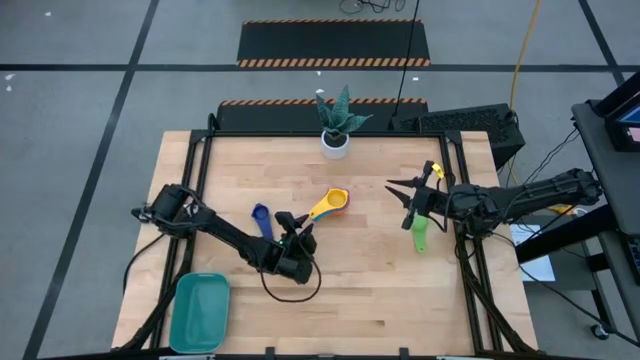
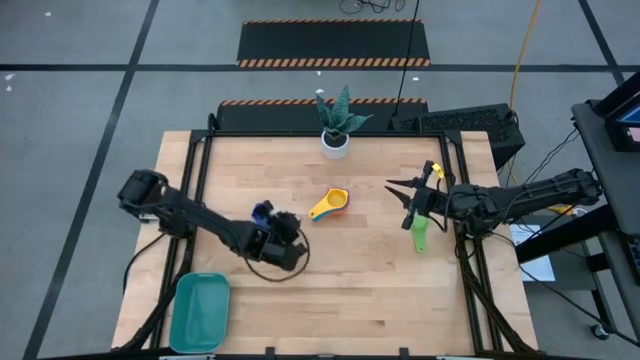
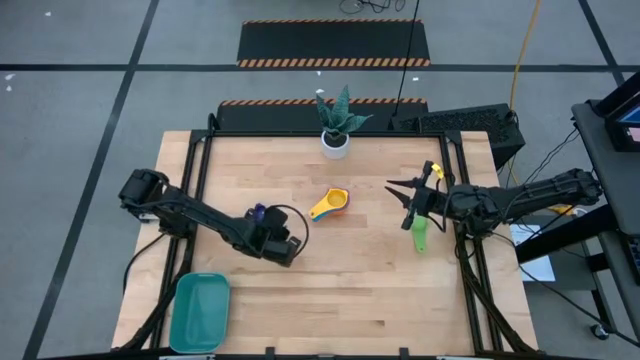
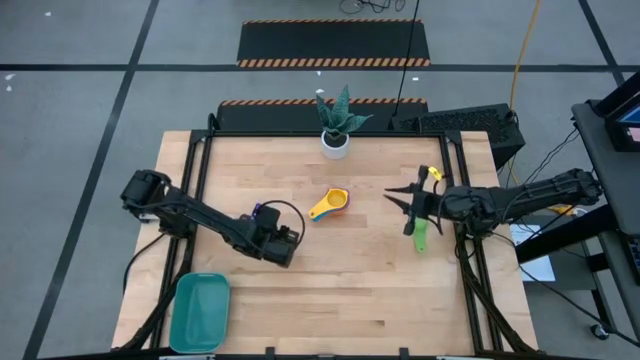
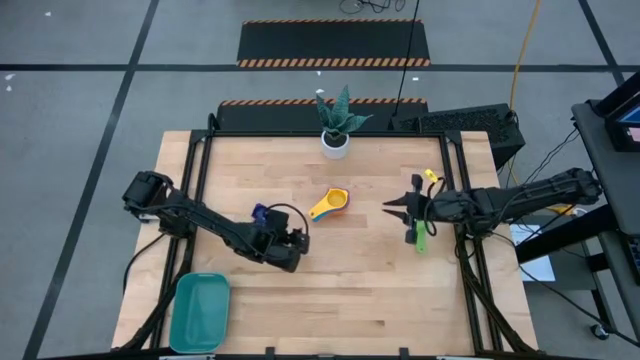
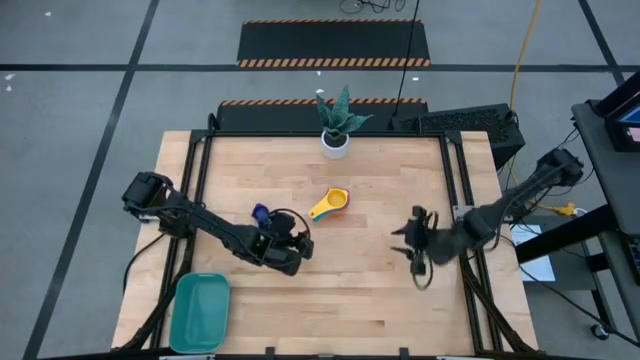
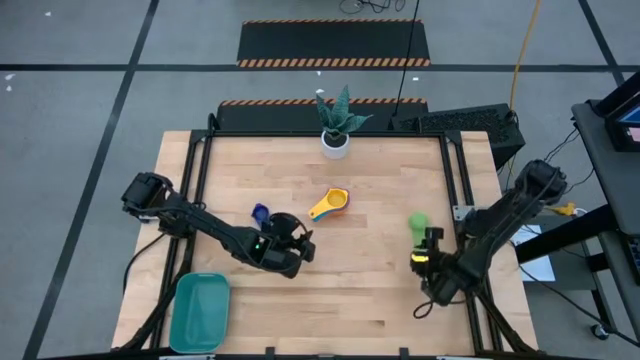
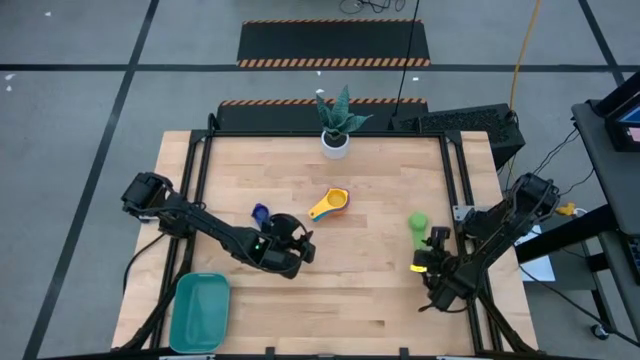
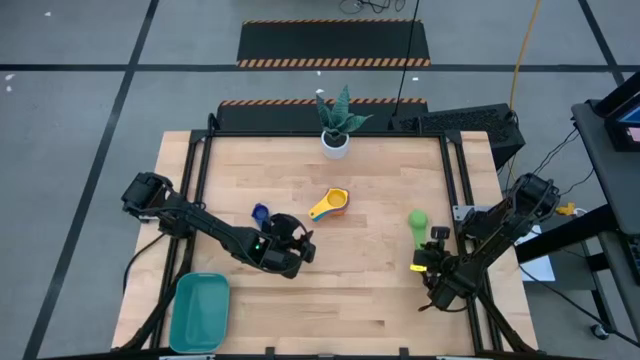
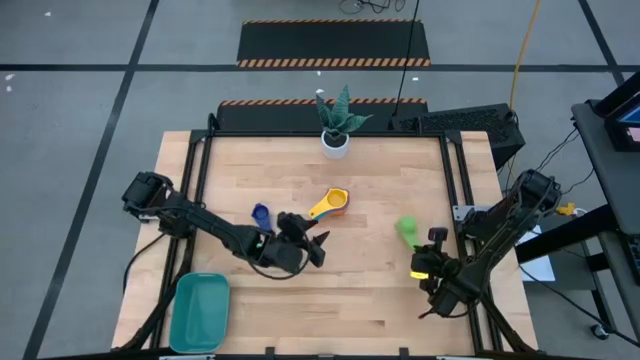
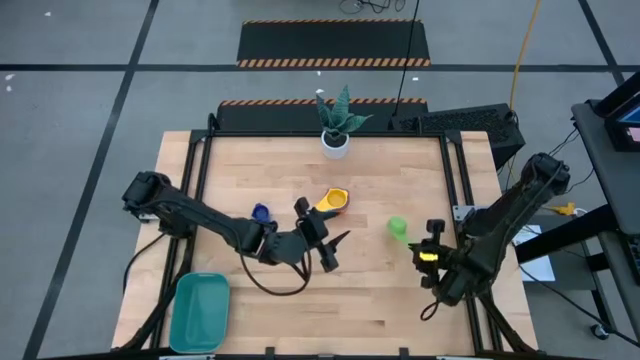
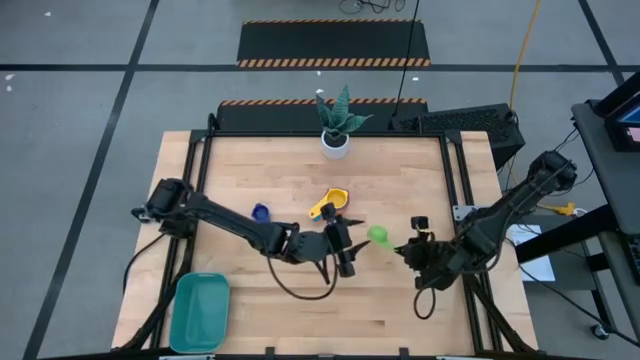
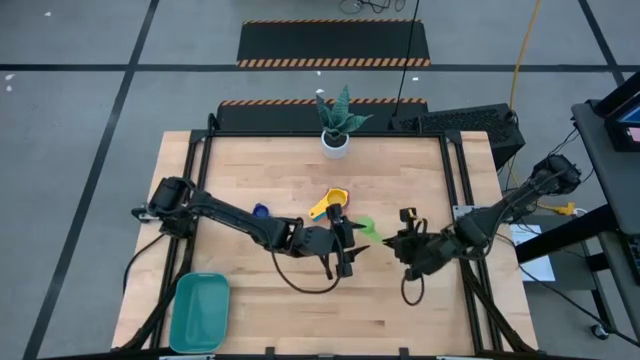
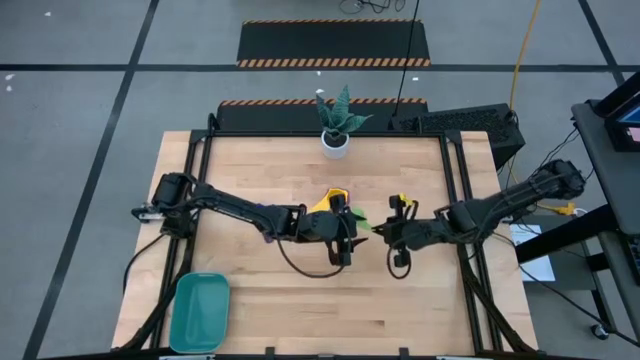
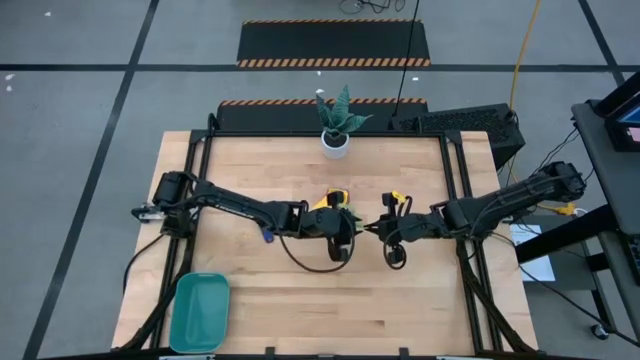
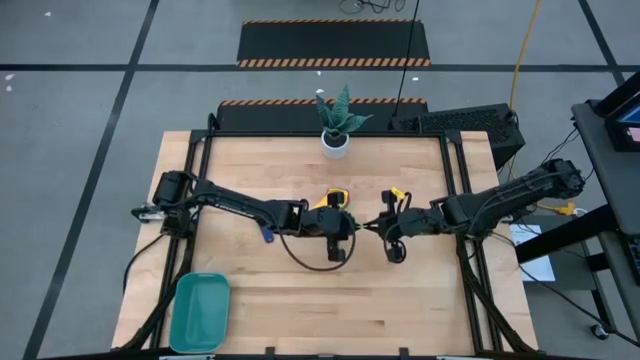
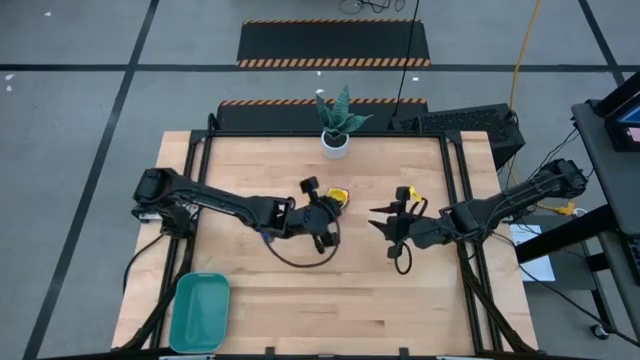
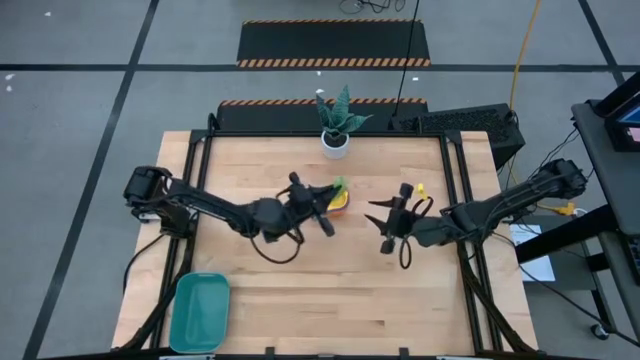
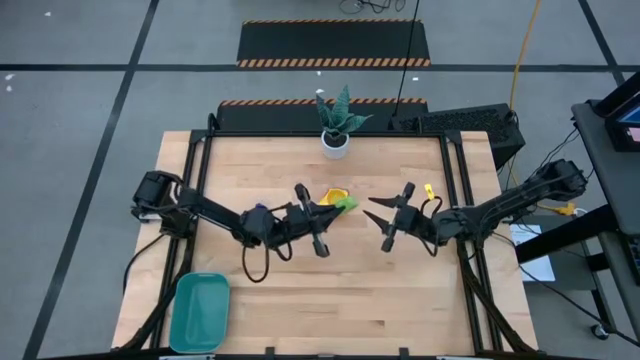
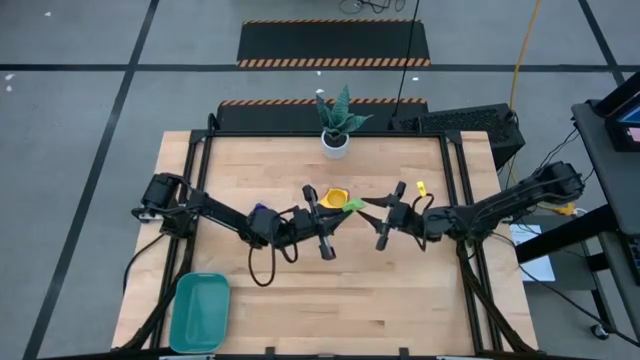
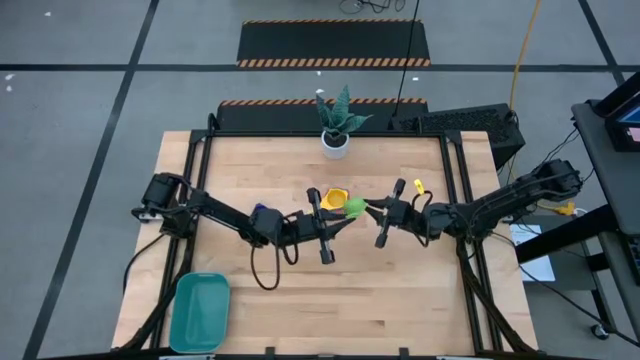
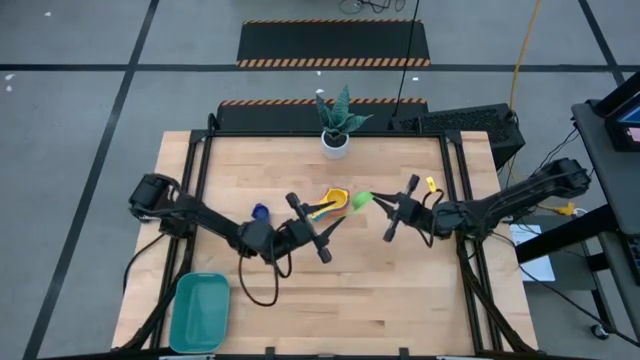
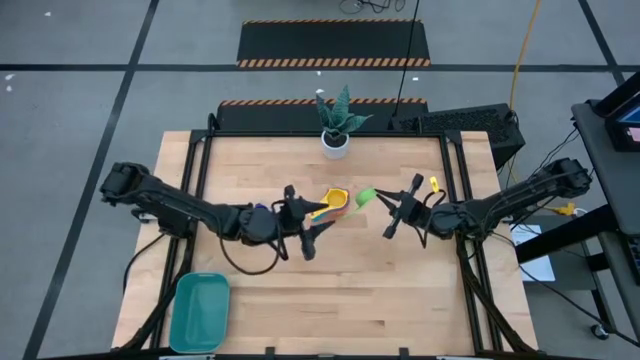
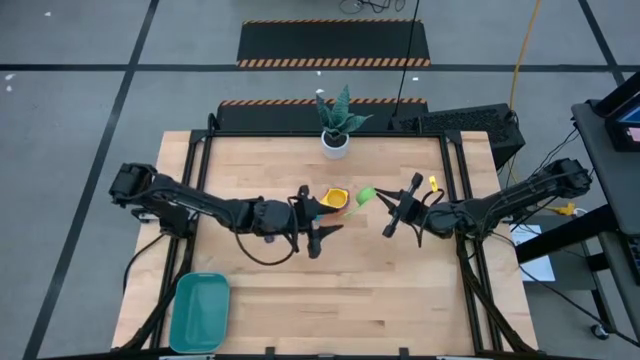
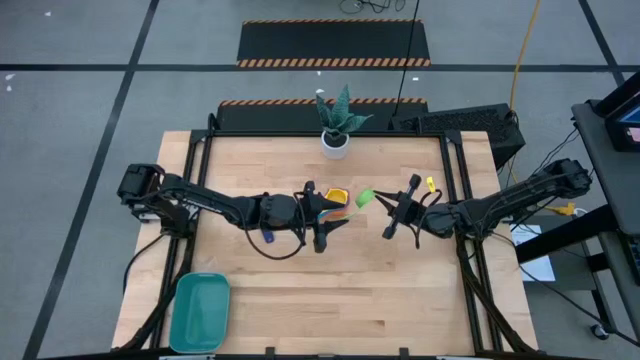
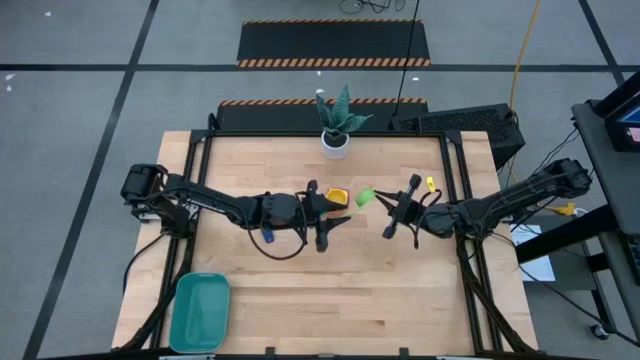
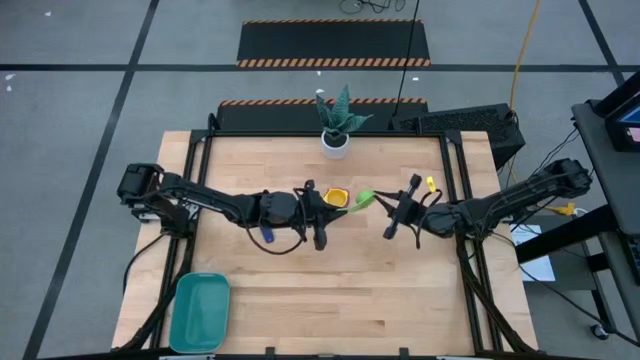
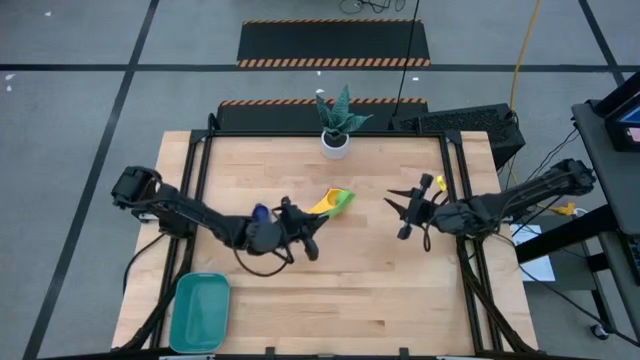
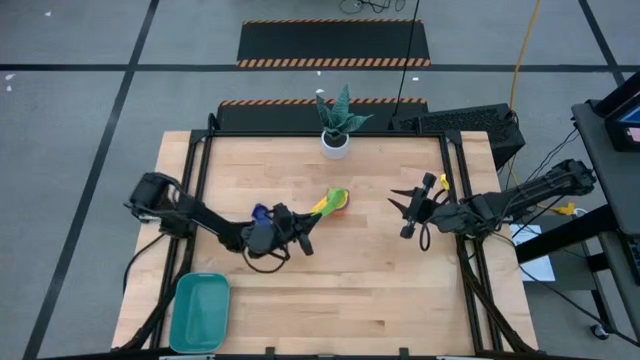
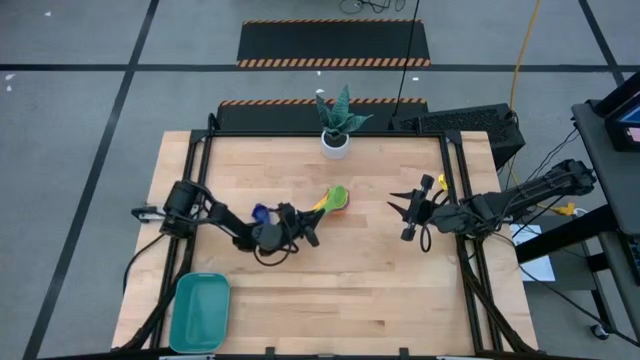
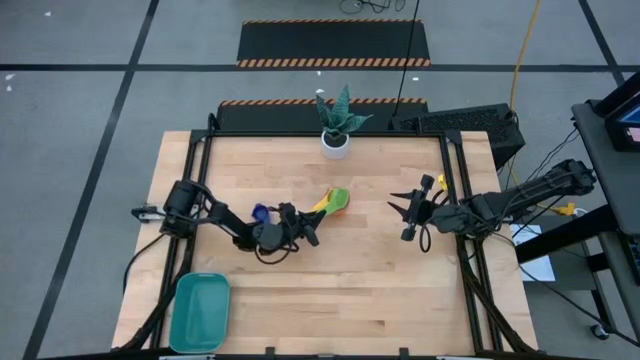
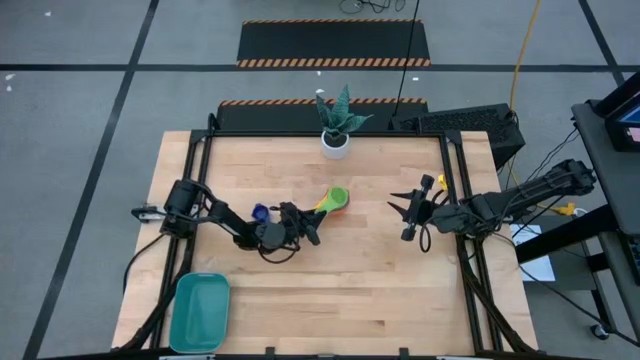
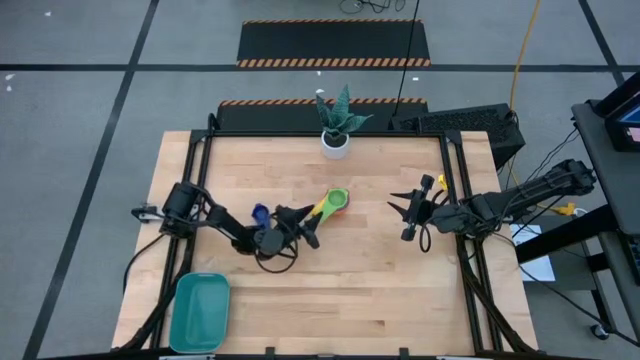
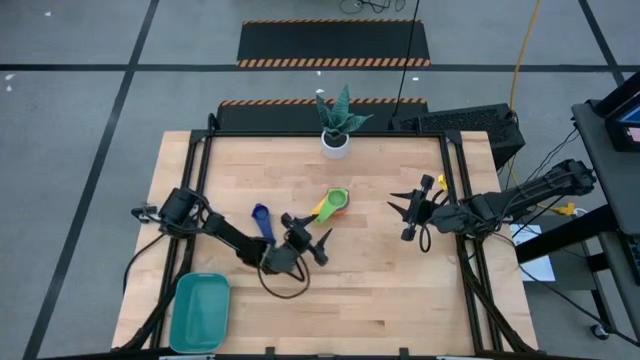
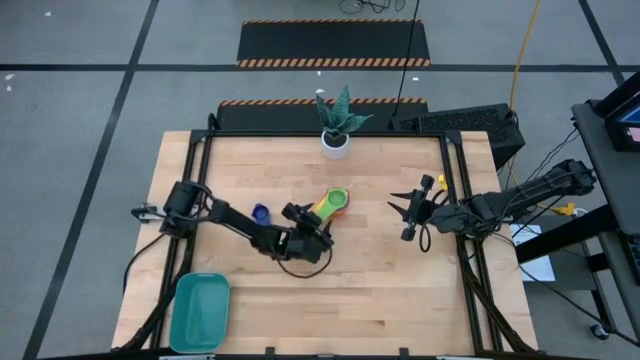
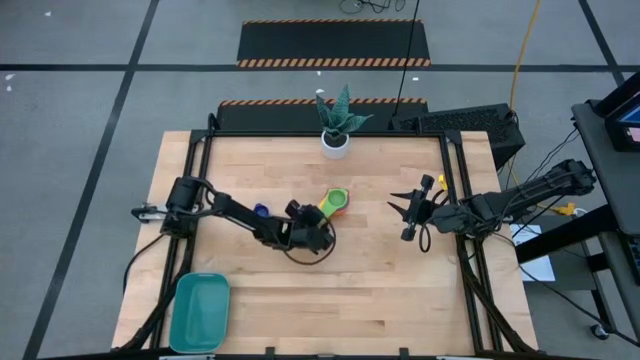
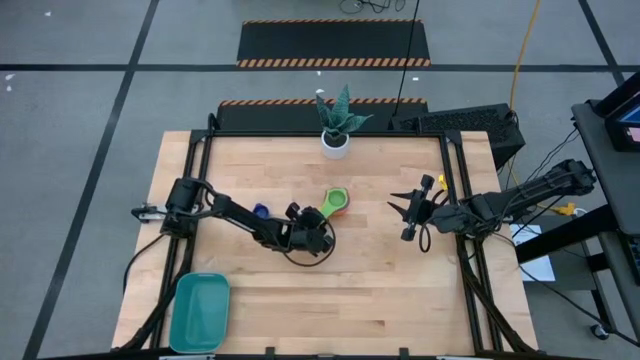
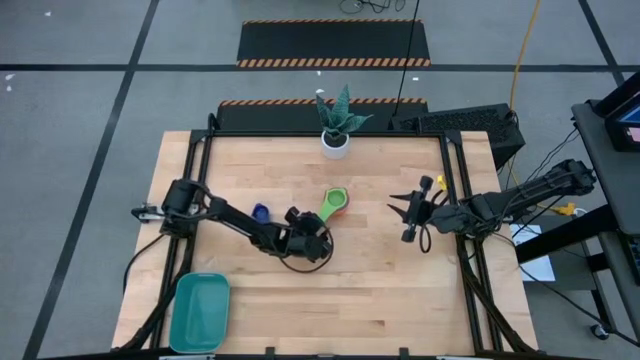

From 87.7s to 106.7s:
Task: Nest measuring cups in basket
Stack the green measuring cup on the yellow measuring cup

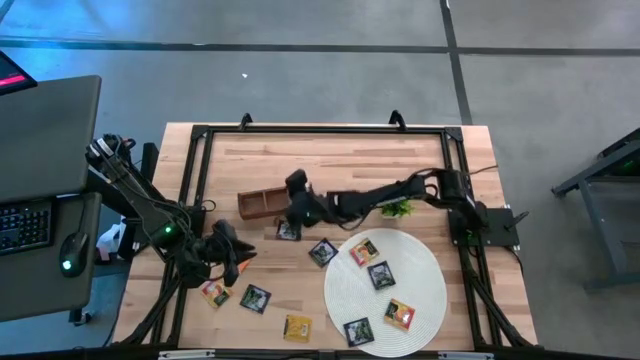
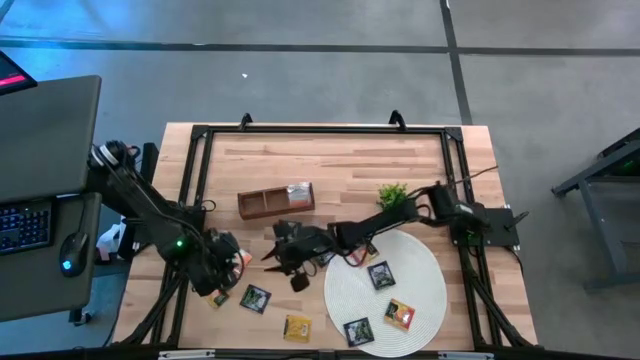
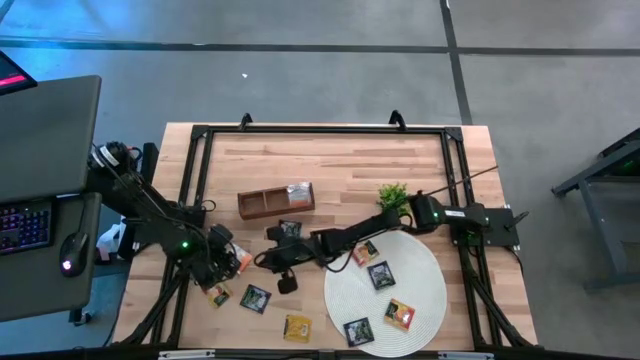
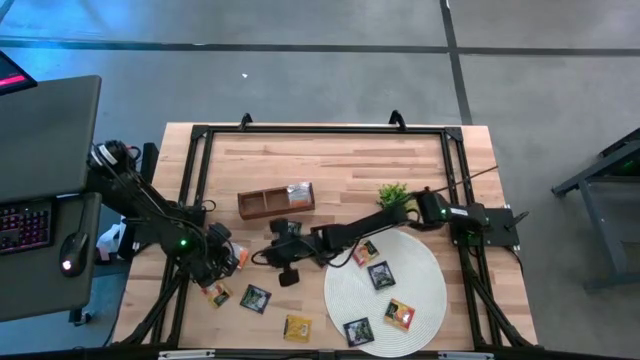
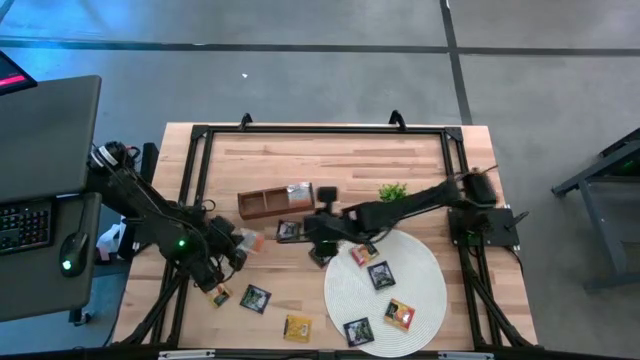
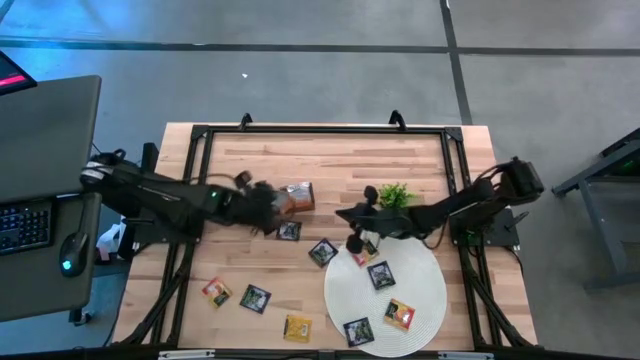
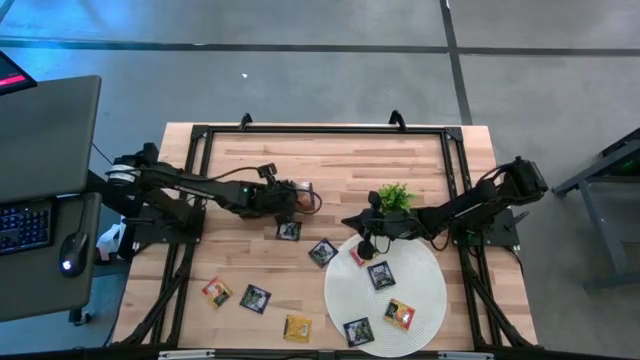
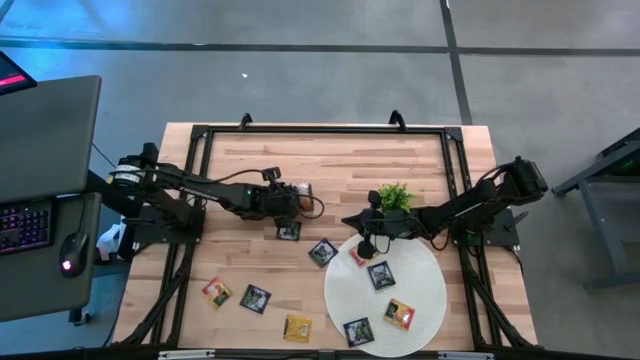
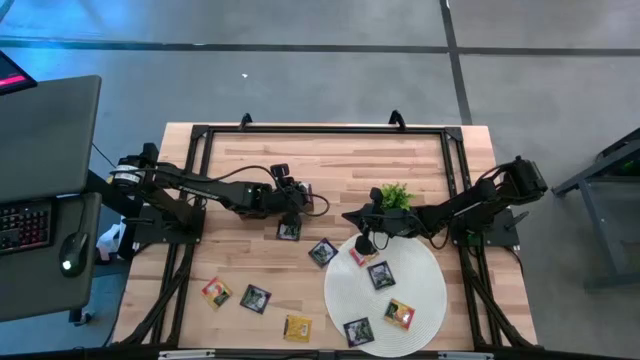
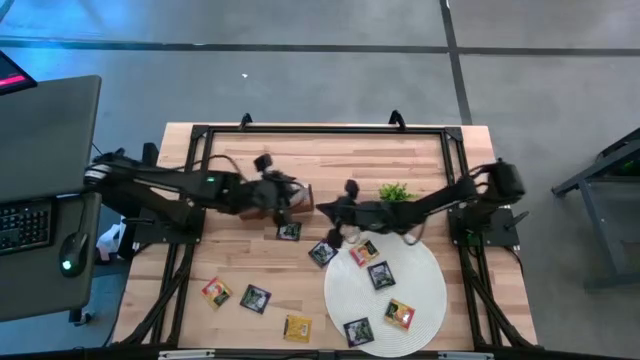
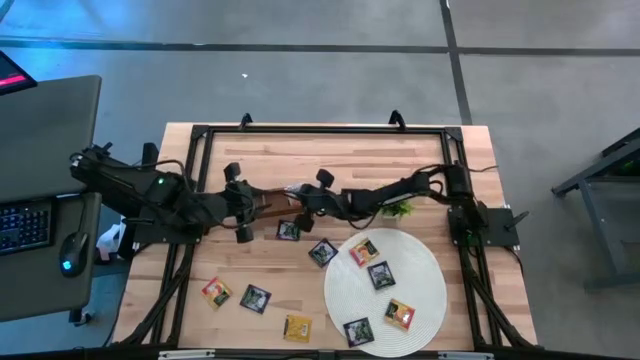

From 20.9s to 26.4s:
Task: Pick & Place Tea
Put the white tea bag into the right section of the wooden organizer
